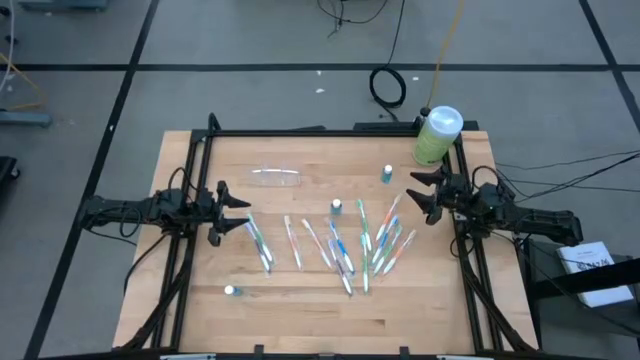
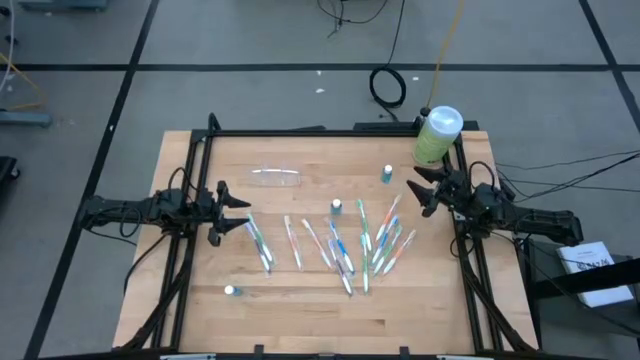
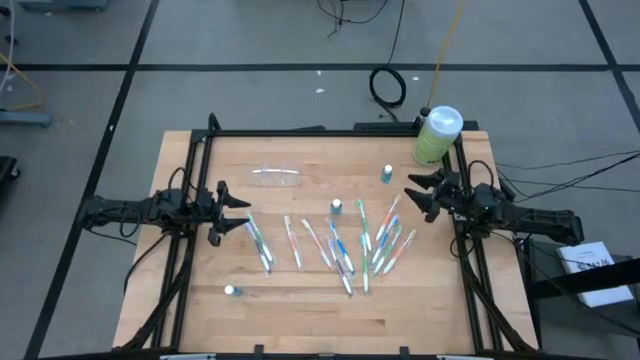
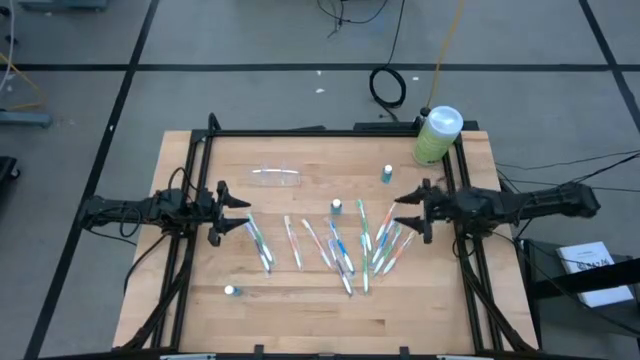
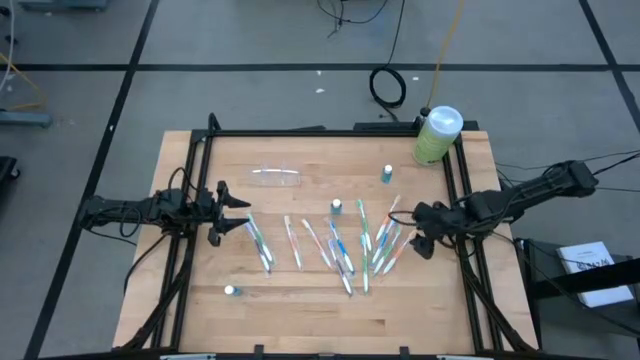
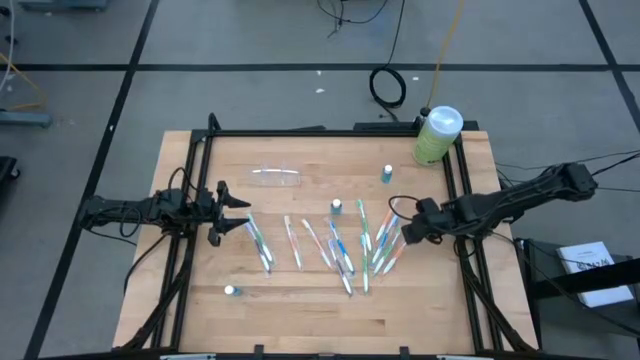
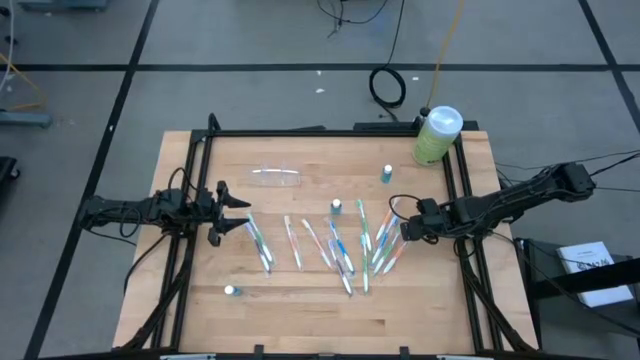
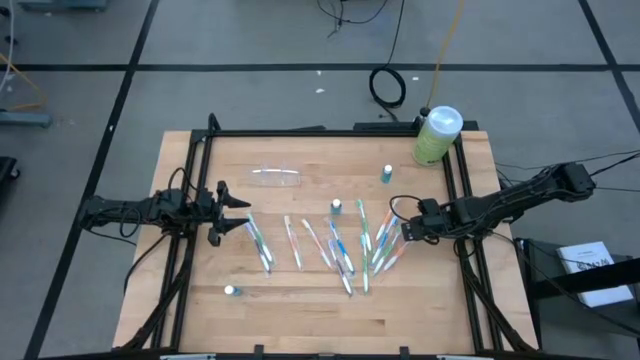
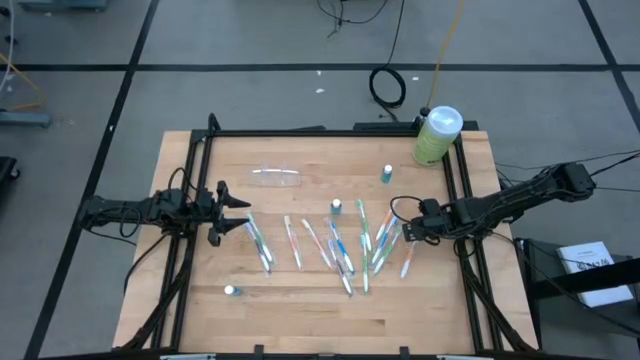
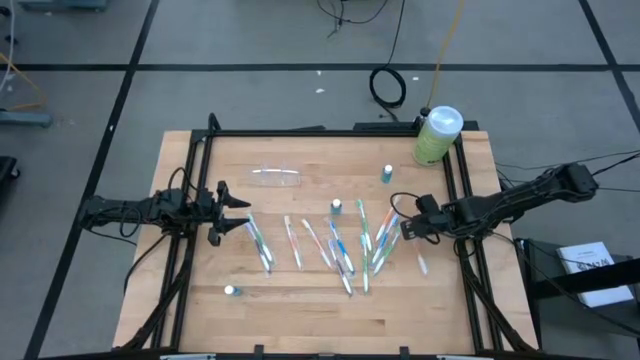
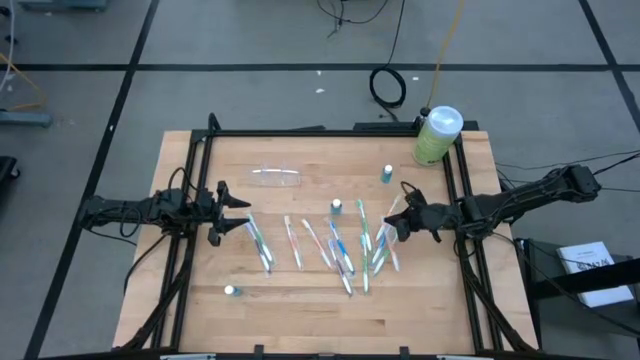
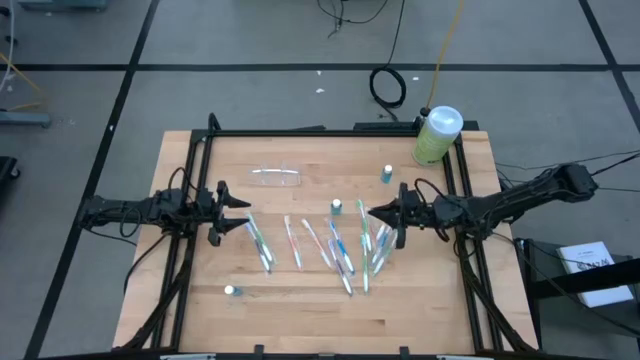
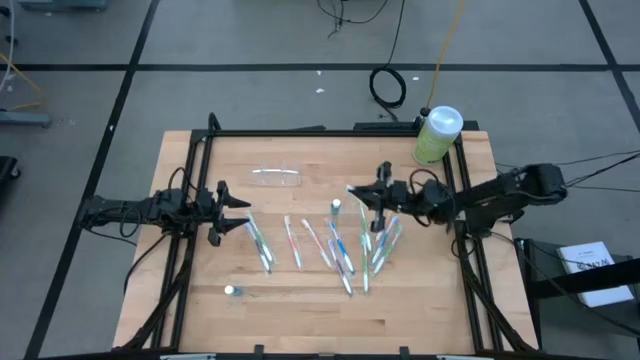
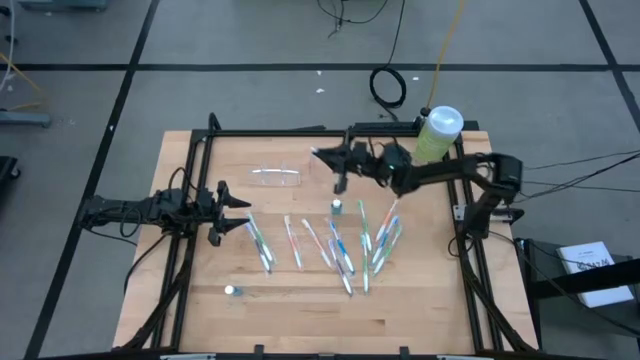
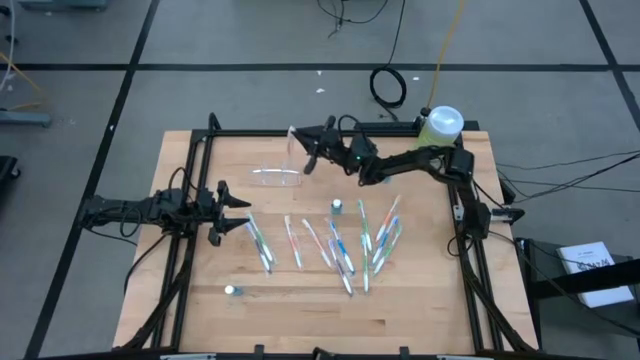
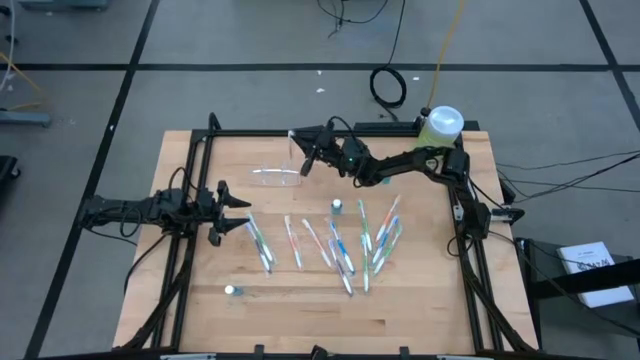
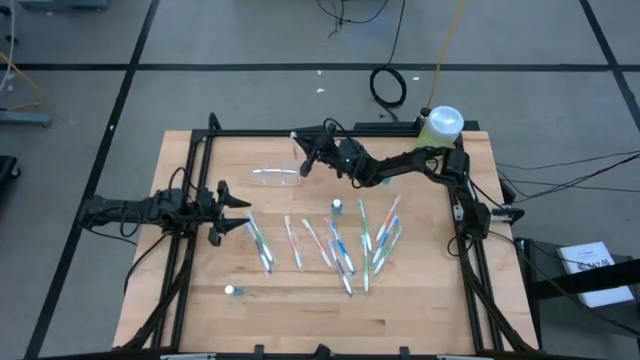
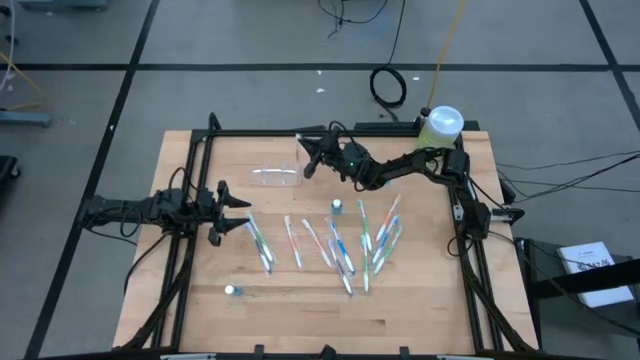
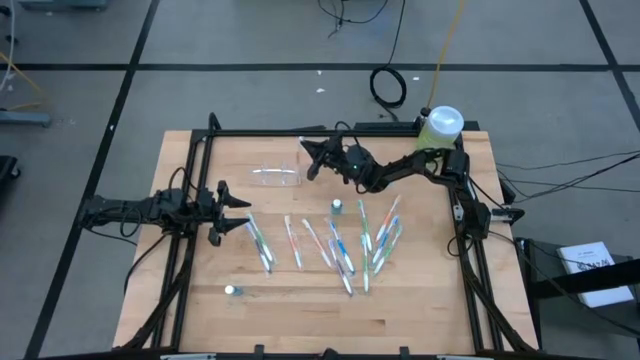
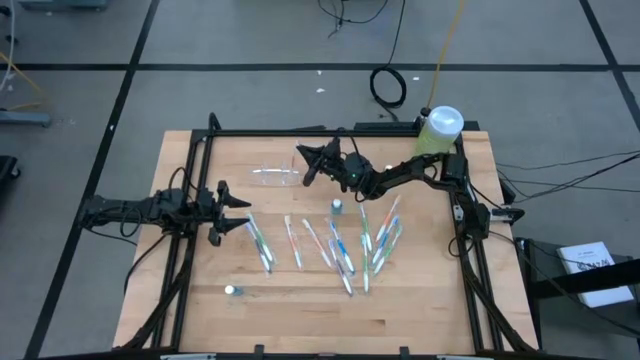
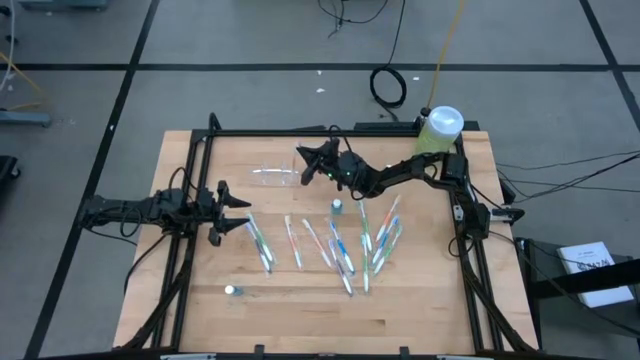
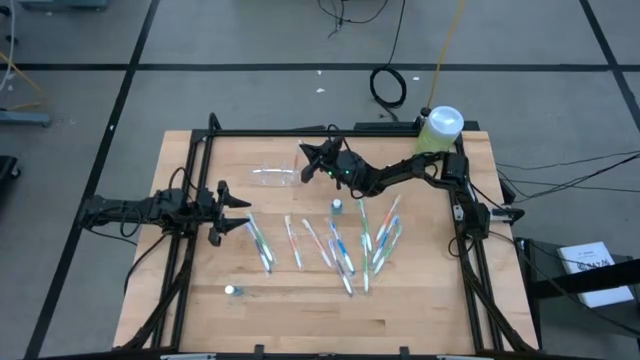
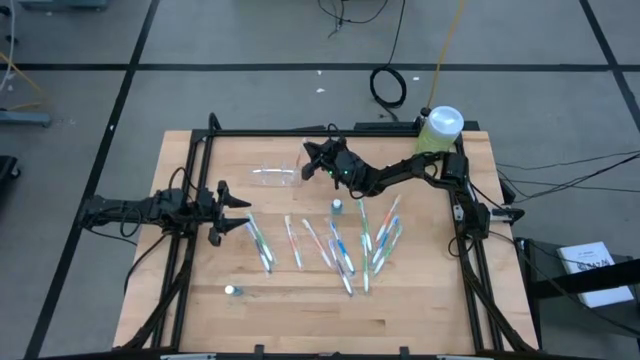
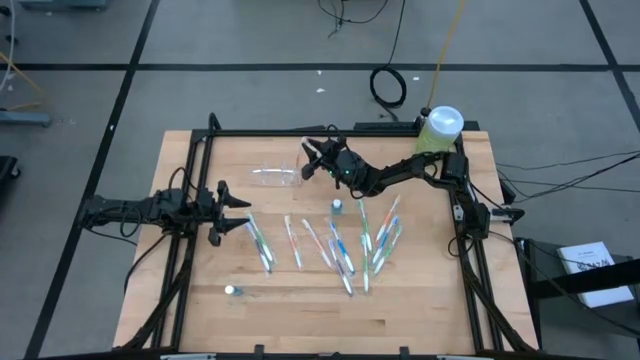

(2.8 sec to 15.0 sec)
Task: Pick & Place toothbrushing station
Put the orange toothbrush into the transparent organizer

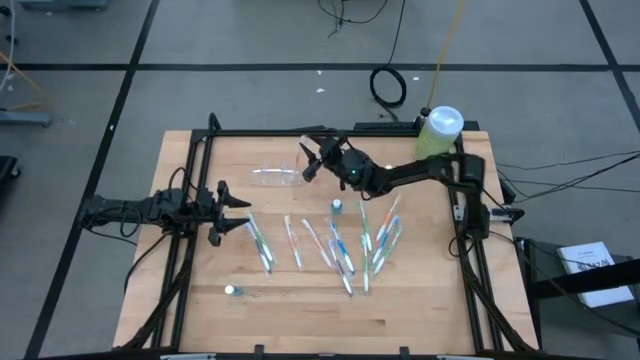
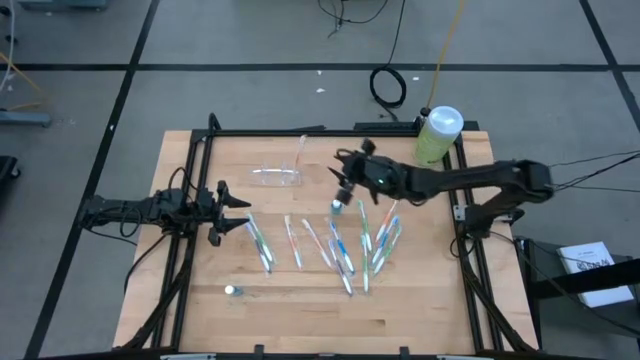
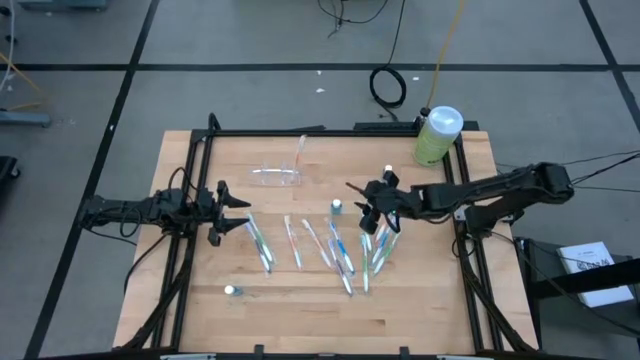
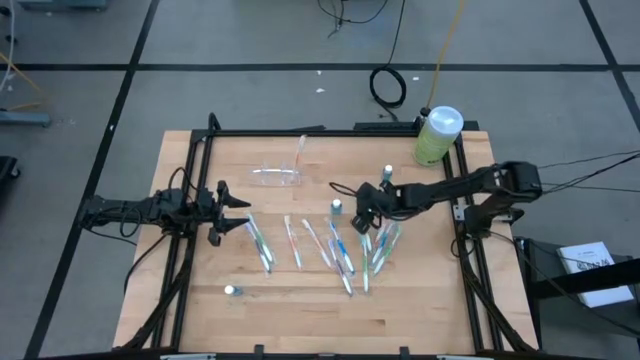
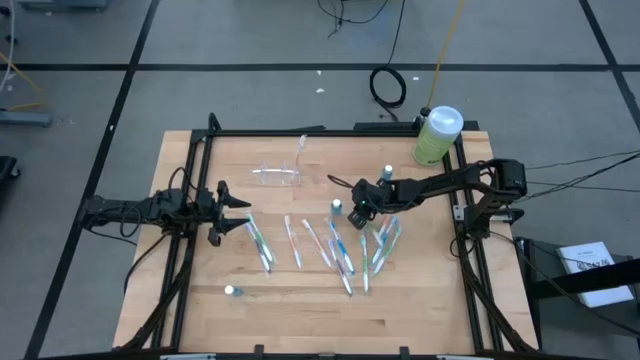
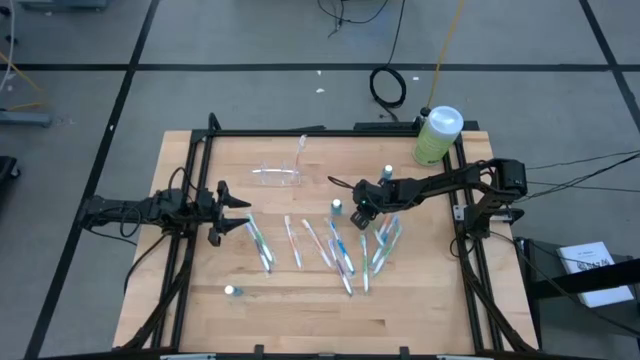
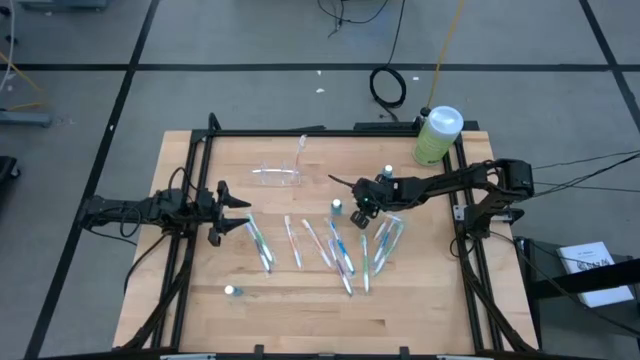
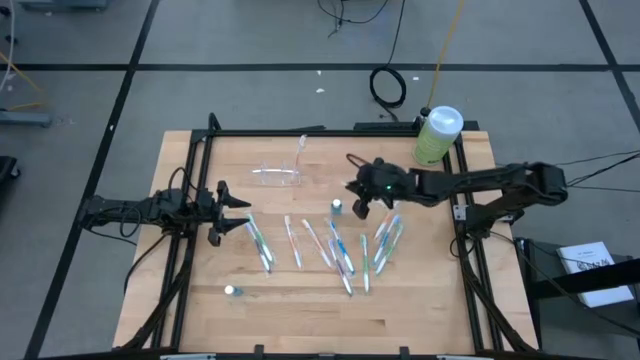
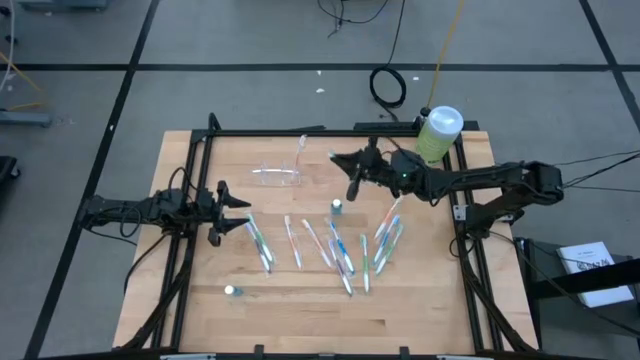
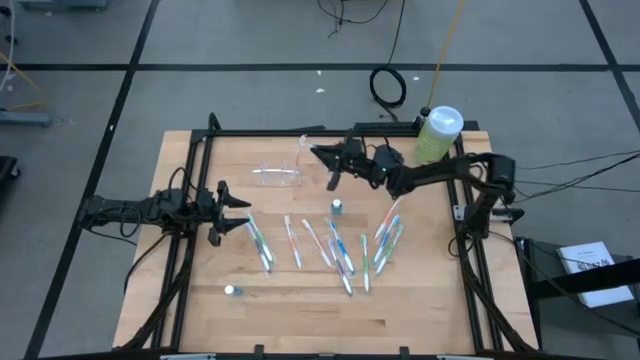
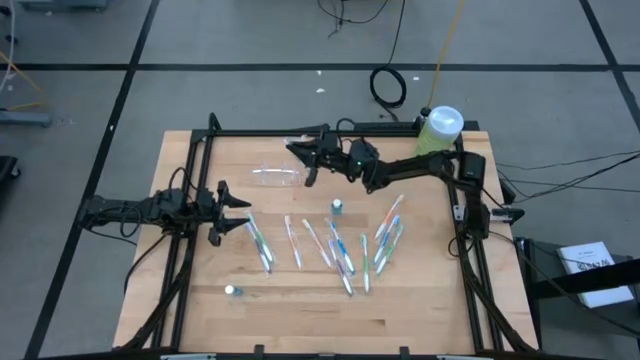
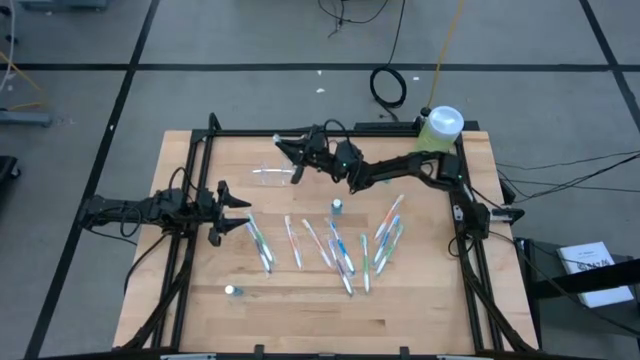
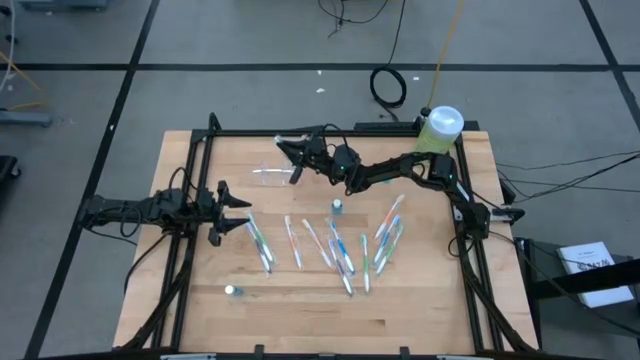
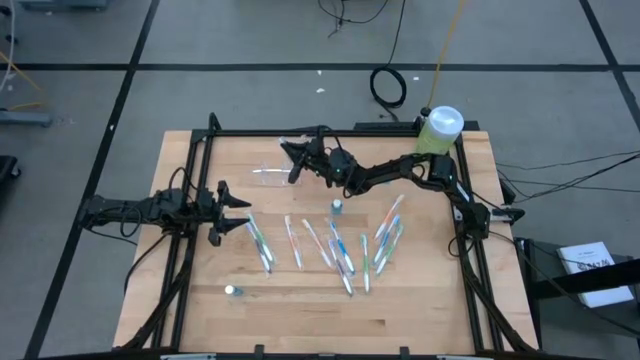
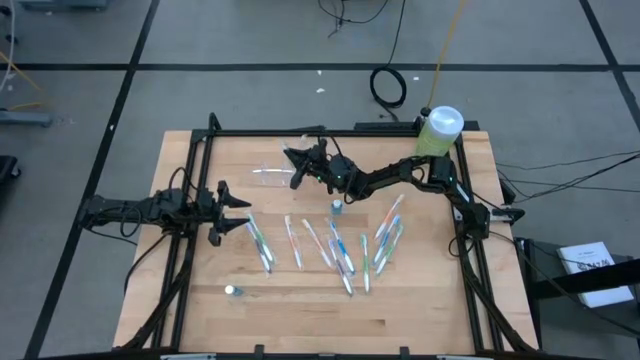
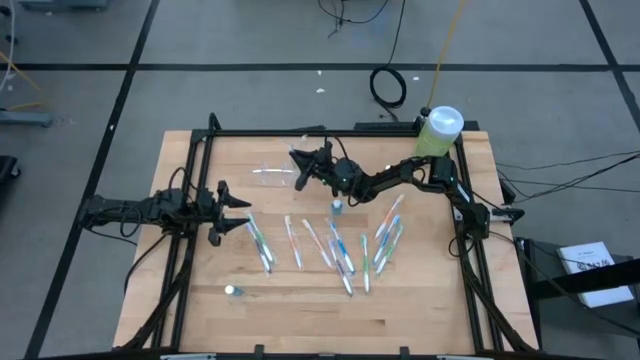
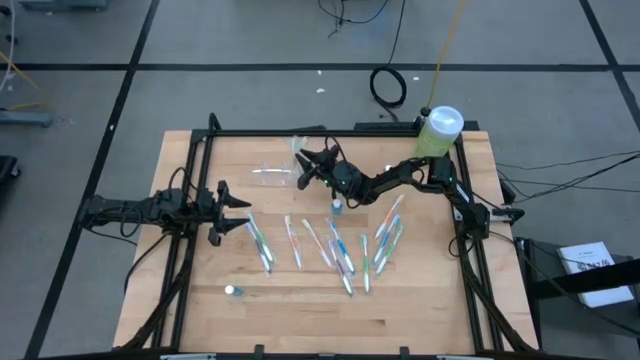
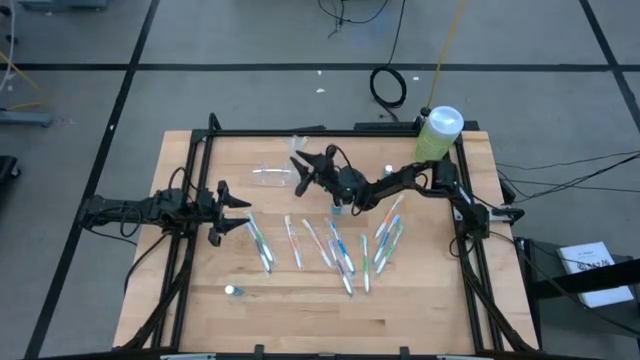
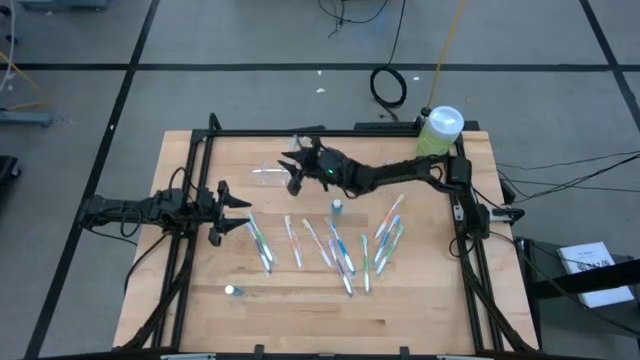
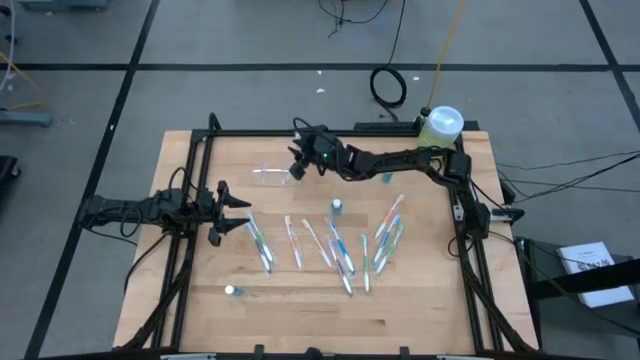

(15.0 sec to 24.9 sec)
Put the green toothbrush into the transparent organizer
